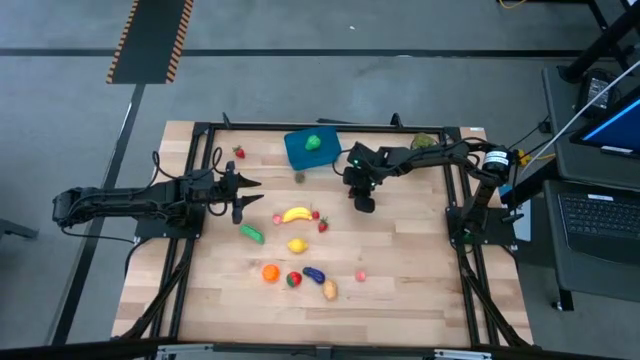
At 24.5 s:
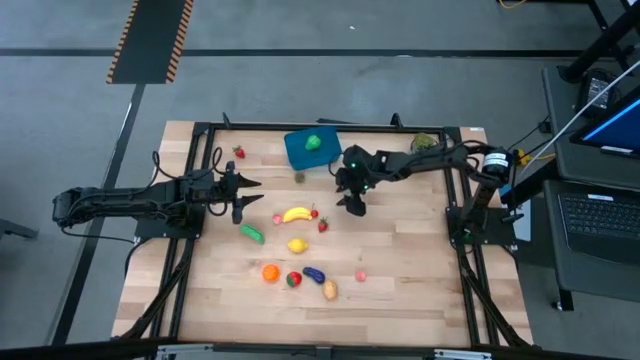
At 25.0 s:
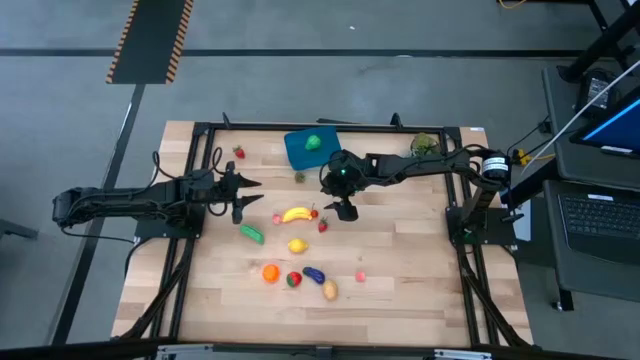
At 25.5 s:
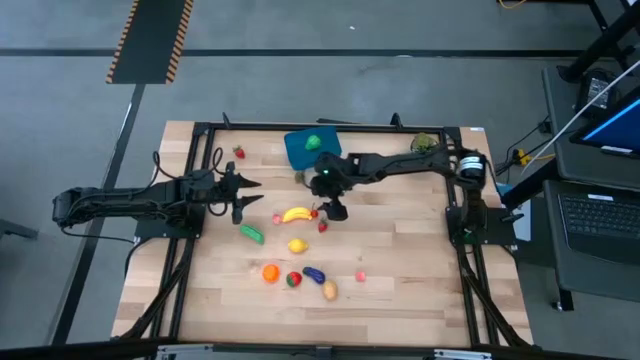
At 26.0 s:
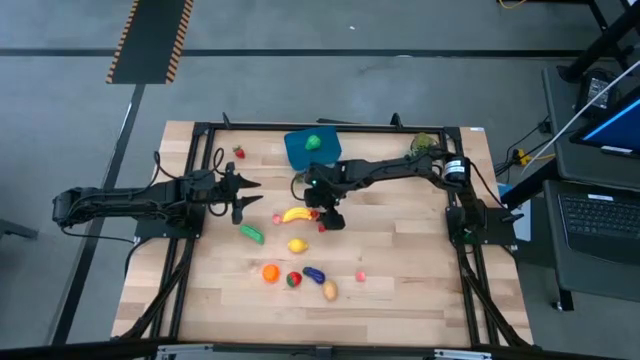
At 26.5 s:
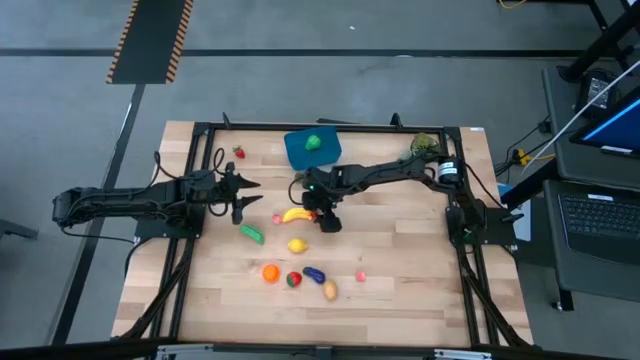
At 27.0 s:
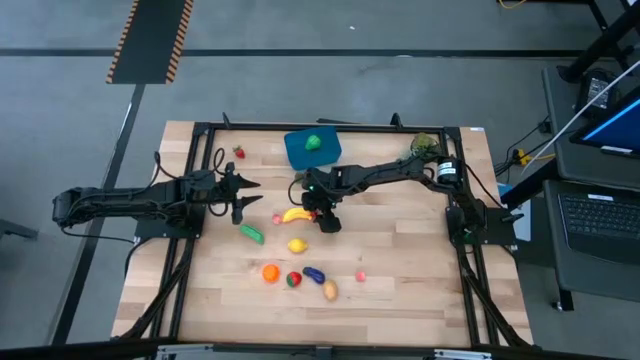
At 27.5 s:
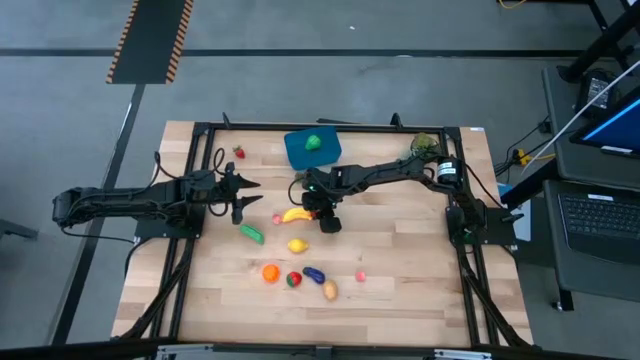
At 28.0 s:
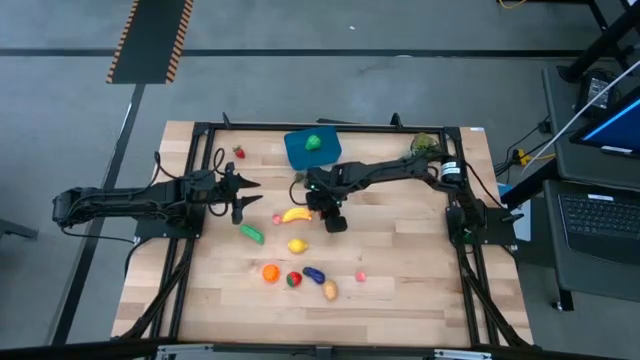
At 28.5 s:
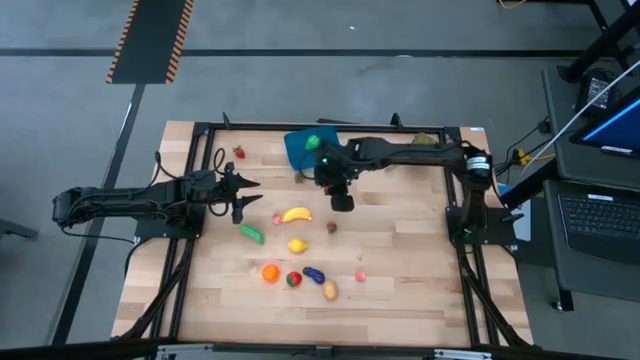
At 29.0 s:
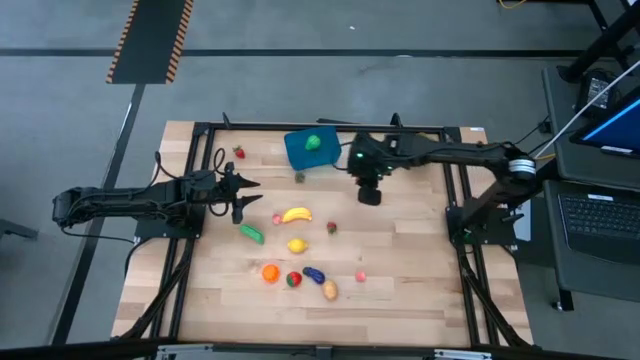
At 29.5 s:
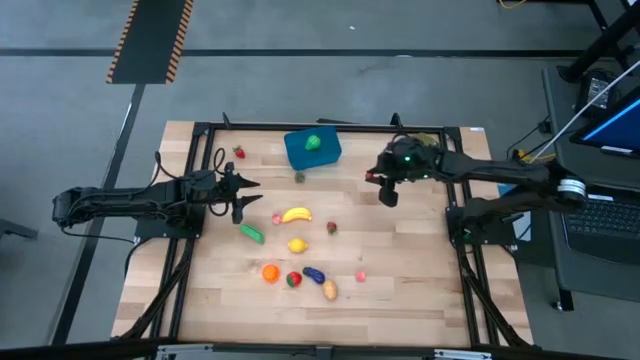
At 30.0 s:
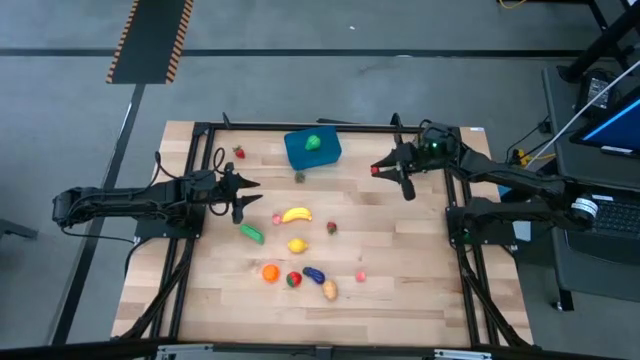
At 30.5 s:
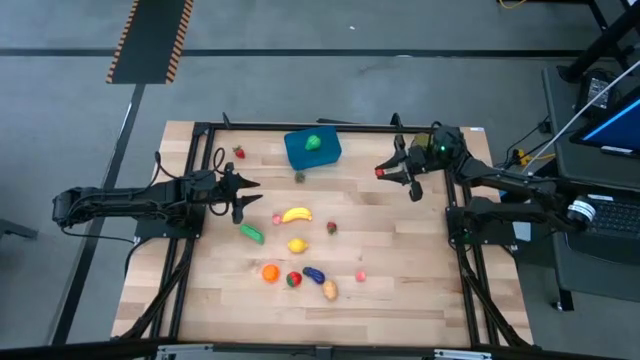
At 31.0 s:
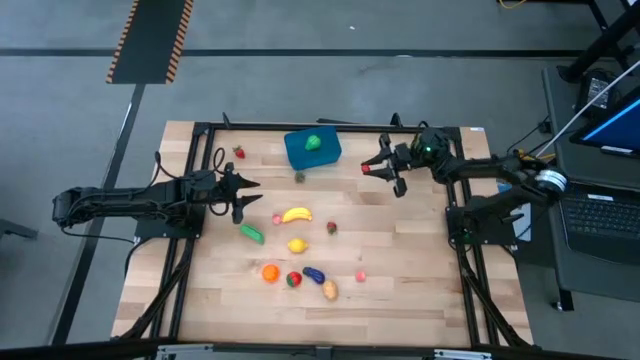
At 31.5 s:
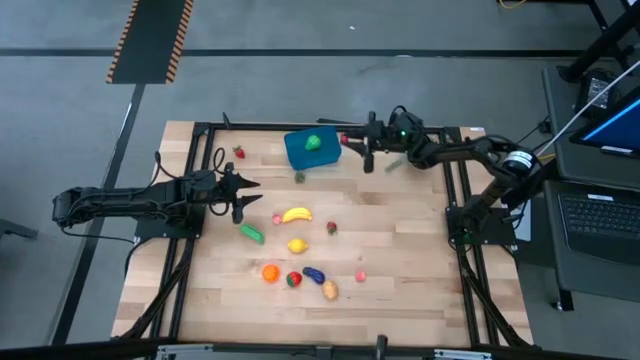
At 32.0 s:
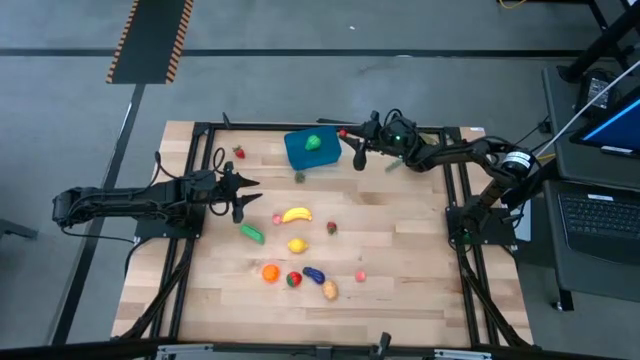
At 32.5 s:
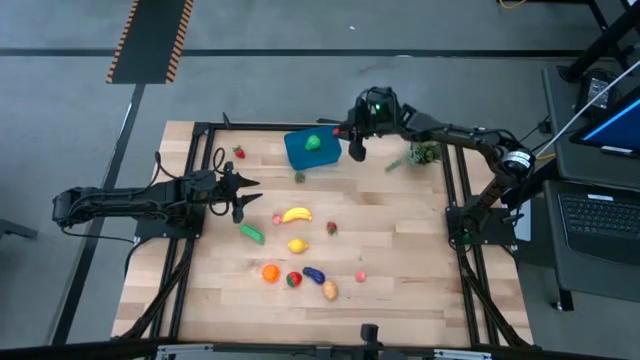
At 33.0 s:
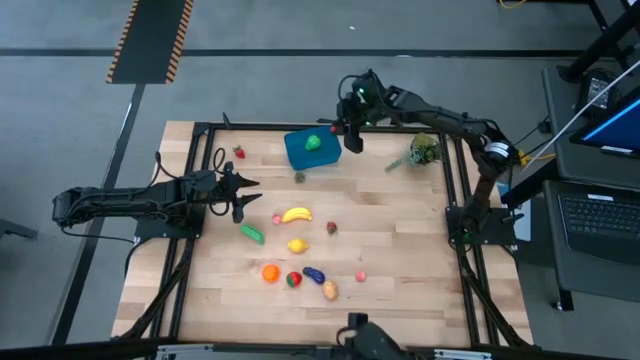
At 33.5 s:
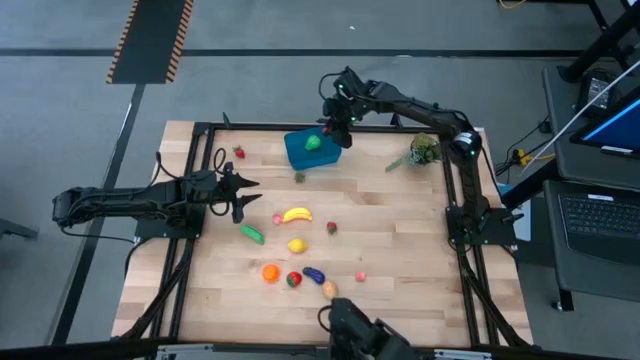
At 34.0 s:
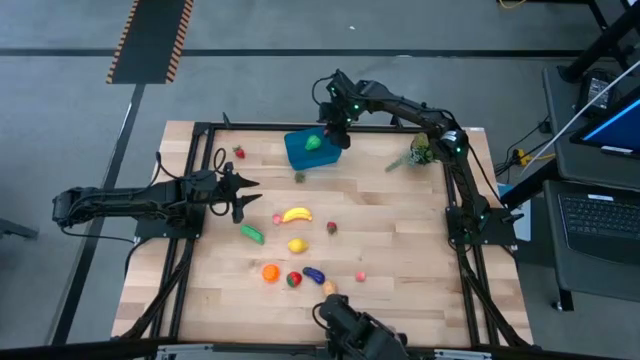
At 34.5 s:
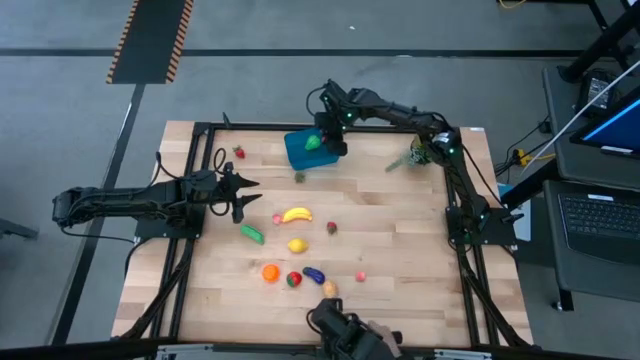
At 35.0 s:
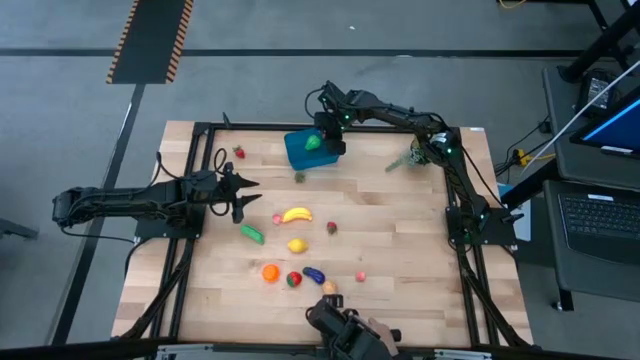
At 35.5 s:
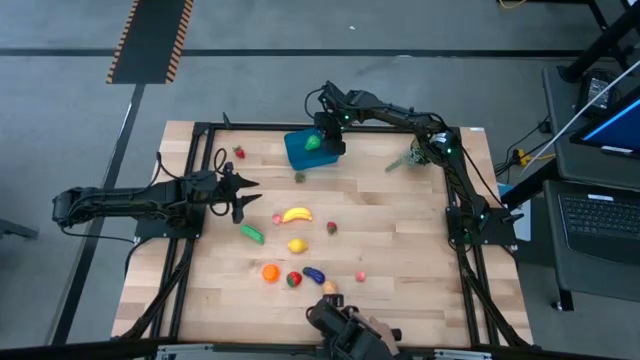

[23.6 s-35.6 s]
Task: Pick and placing Produce into tupperware
Put the cherry into the blue bin

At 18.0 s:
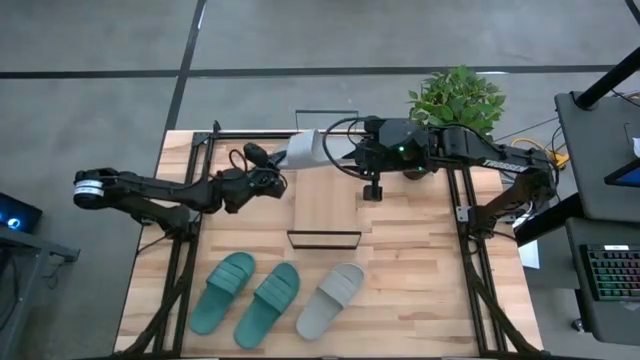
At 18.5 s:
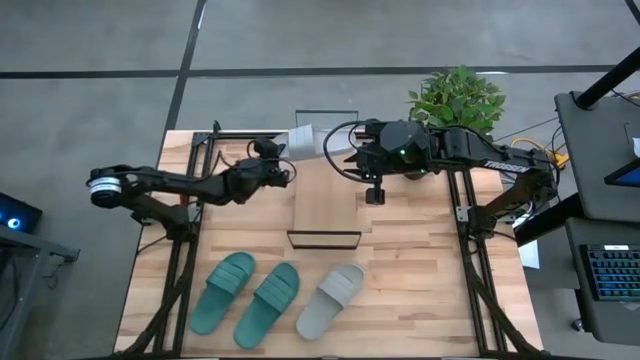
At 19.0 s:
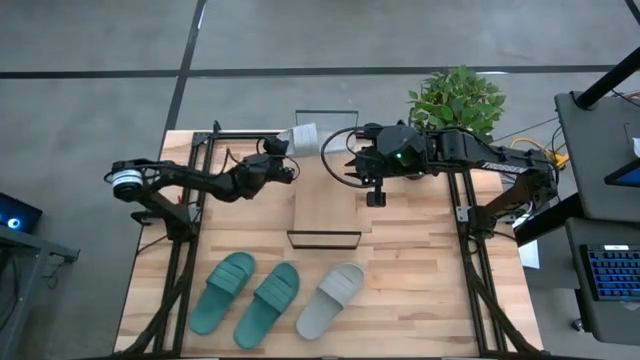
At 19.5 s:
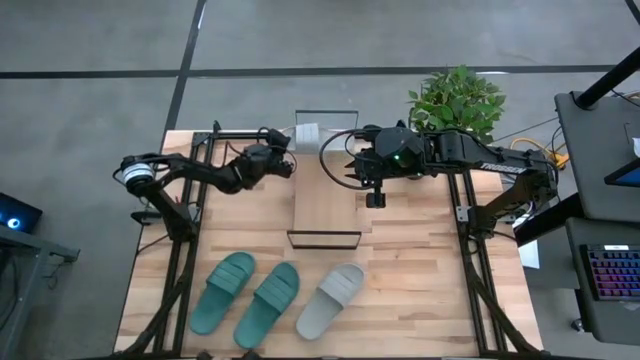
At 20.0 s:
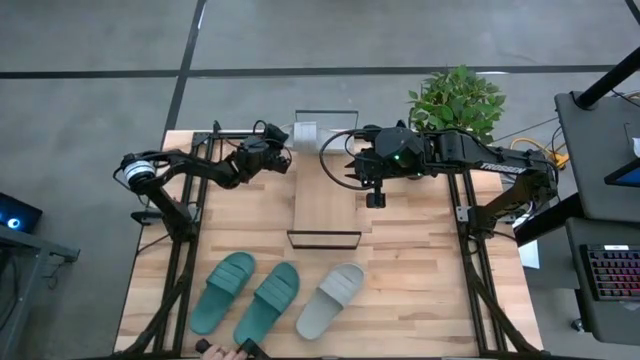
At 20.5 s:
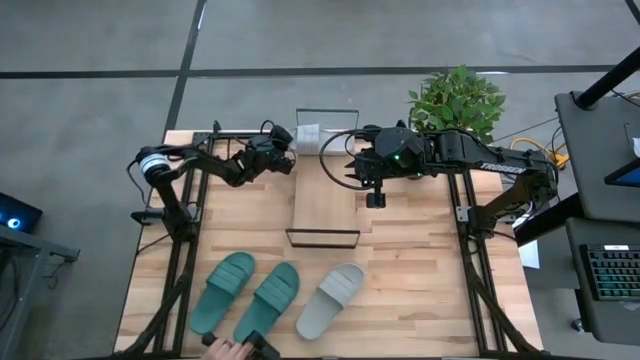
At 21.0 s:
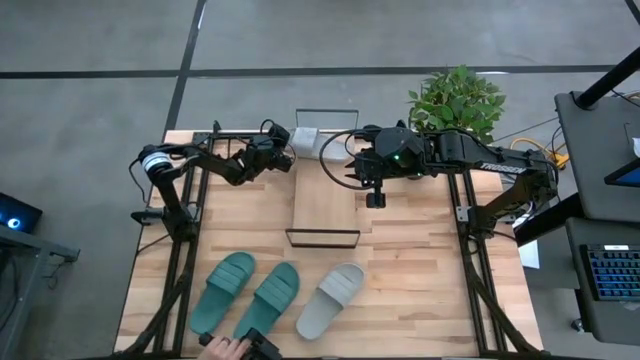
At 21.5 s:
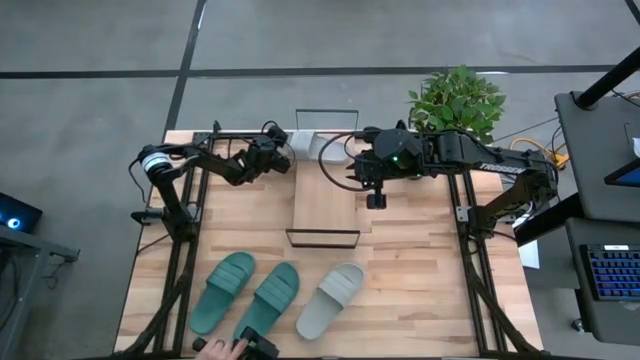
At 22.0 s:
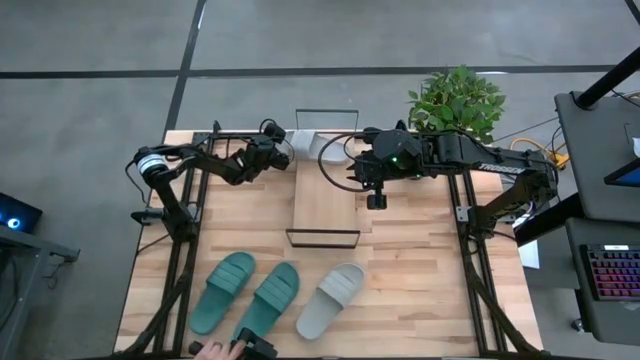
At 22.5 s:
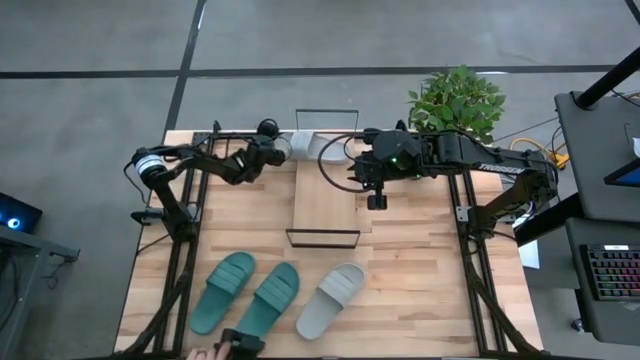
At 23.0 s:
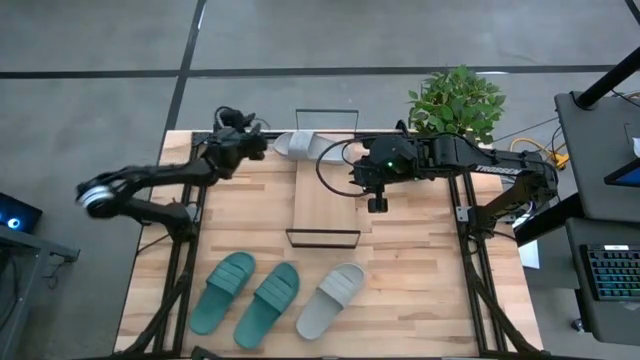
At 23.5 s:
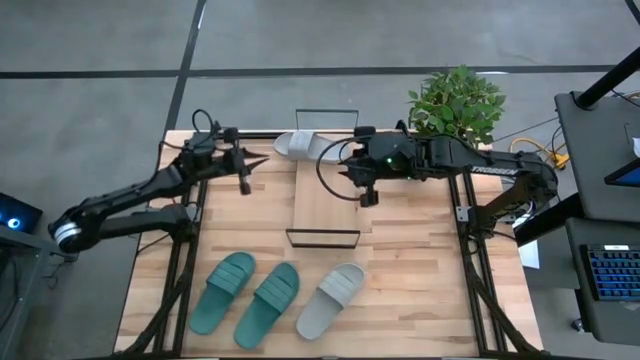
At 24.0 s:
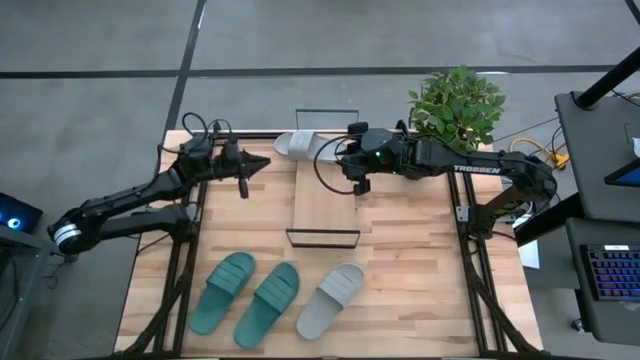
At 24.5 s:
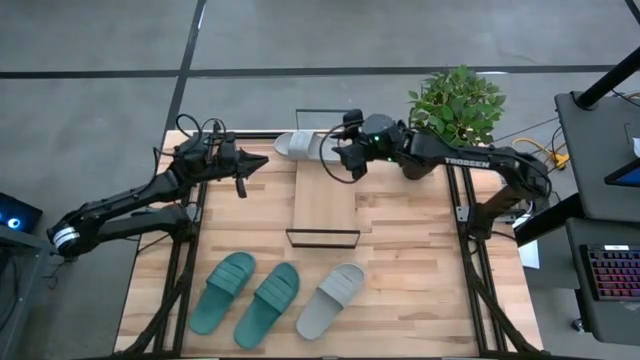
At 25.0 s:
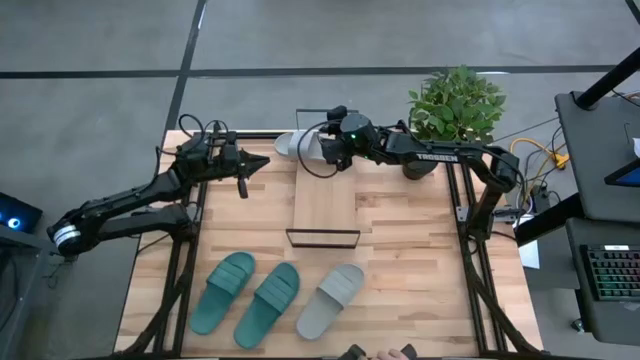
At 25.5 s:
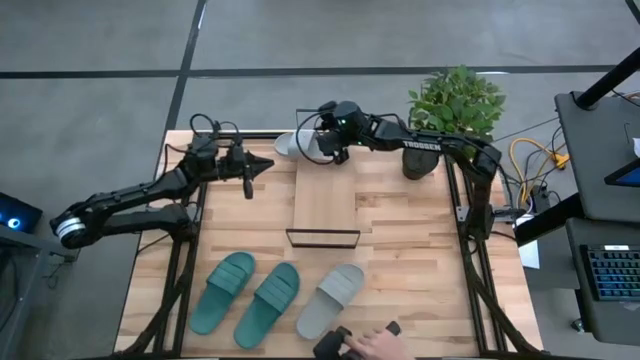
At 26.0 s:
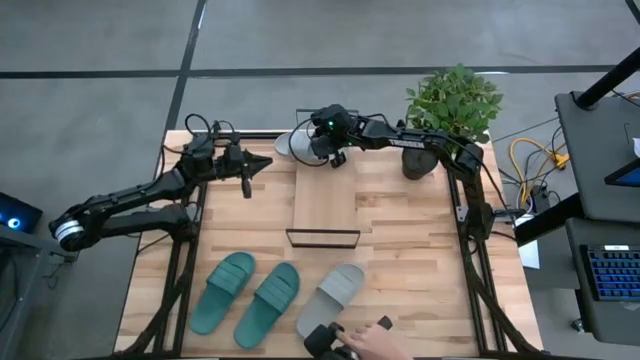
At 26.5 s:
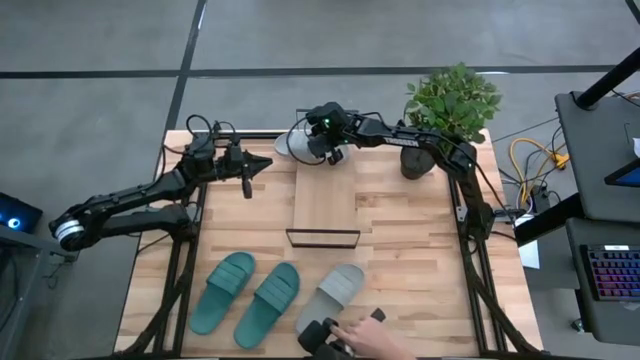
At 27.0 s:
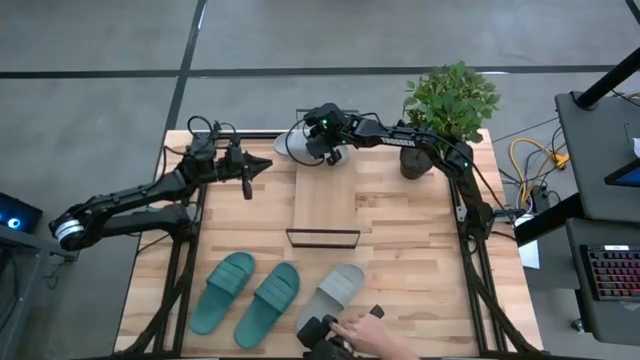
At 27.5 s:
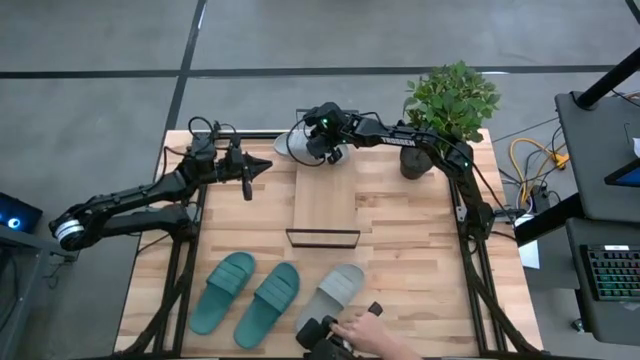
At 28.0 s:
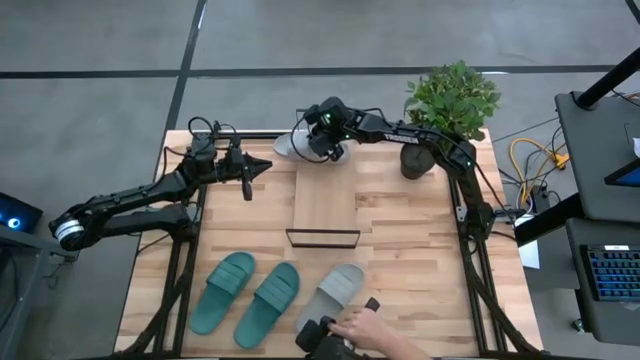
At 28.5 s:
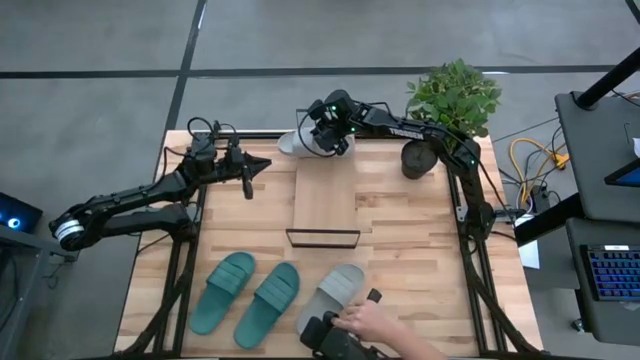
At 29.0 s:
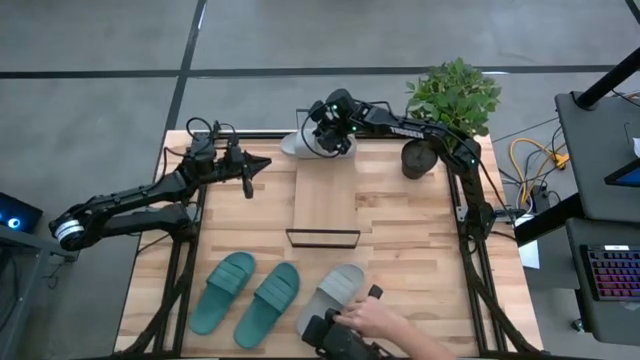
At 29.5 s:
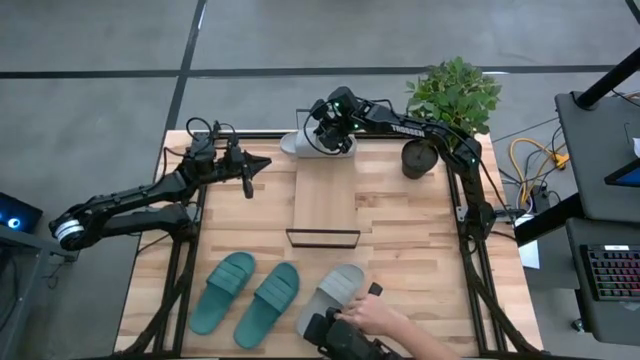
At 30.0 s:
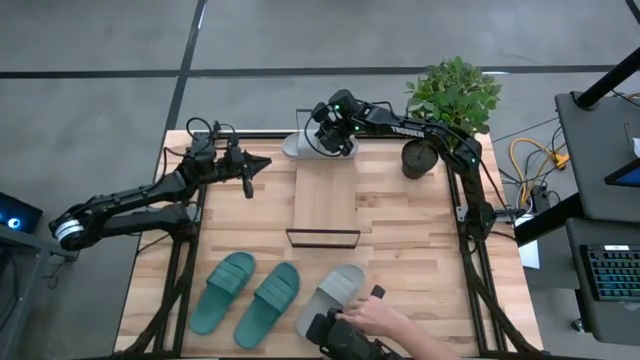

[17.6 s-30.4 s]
Task: Pick and place slides into the shelf
Put the right gray slipper on the shelf
